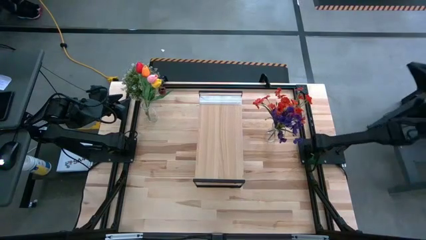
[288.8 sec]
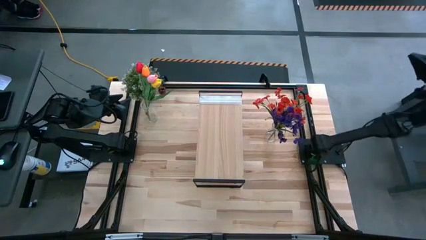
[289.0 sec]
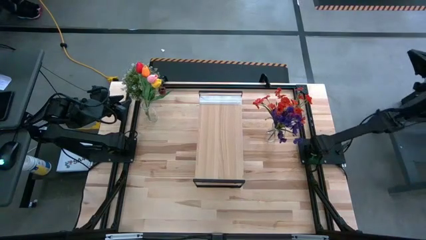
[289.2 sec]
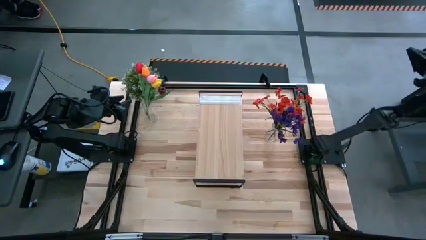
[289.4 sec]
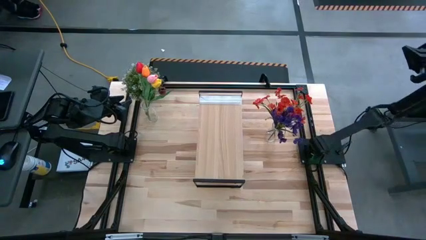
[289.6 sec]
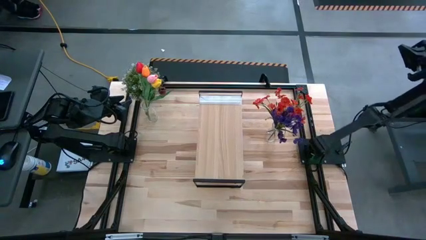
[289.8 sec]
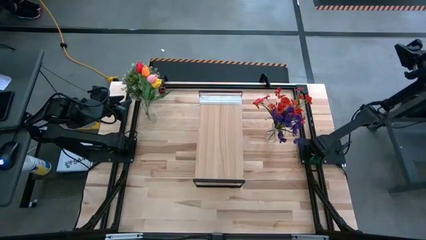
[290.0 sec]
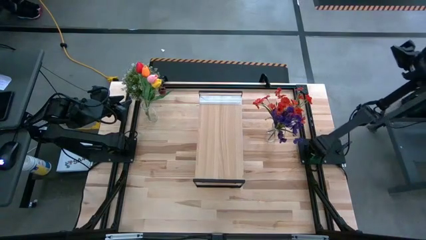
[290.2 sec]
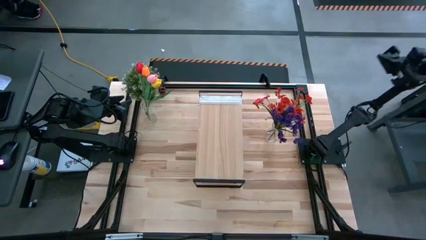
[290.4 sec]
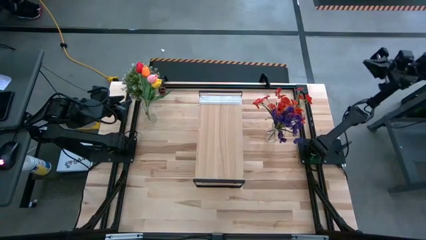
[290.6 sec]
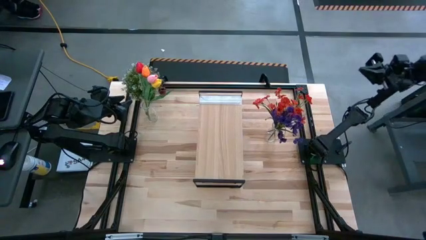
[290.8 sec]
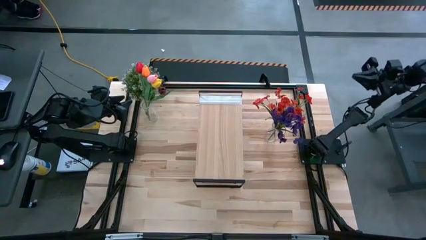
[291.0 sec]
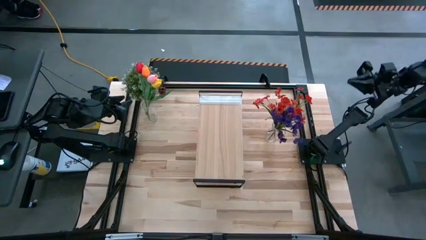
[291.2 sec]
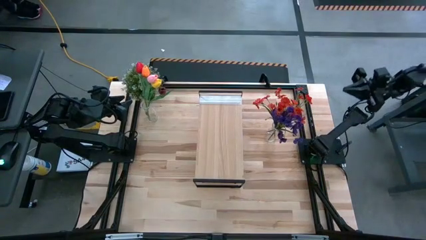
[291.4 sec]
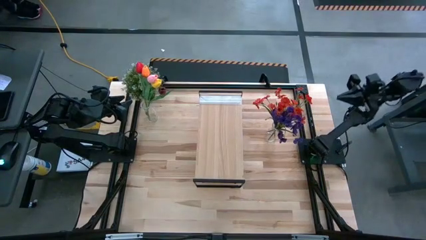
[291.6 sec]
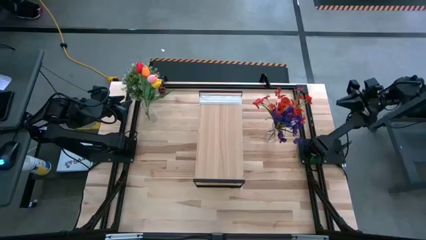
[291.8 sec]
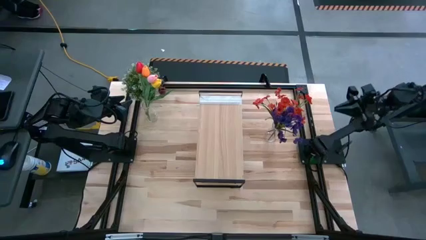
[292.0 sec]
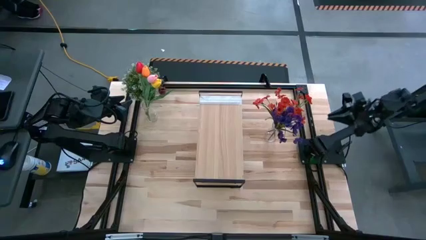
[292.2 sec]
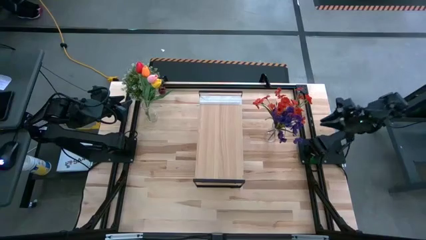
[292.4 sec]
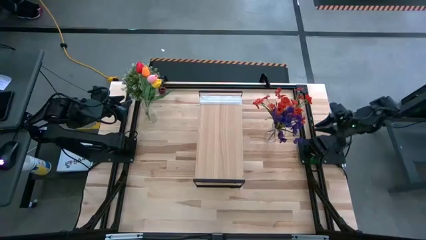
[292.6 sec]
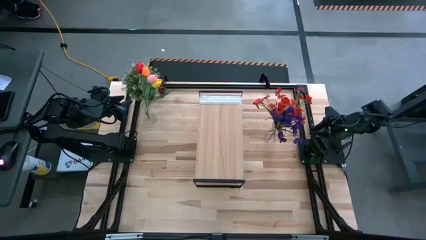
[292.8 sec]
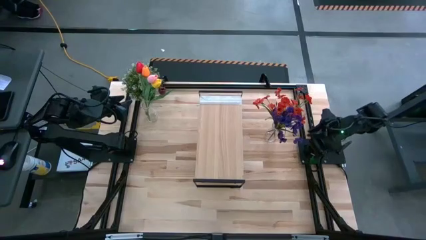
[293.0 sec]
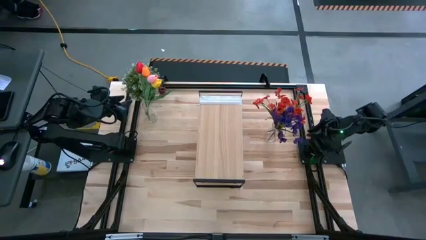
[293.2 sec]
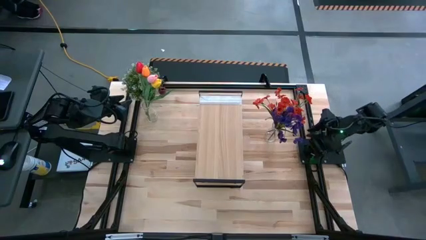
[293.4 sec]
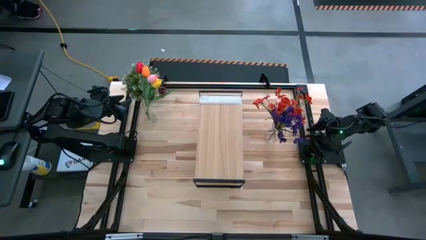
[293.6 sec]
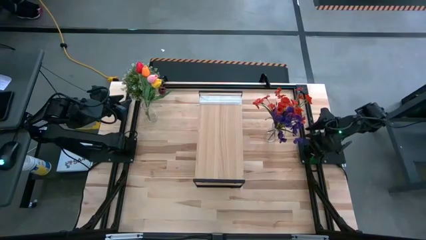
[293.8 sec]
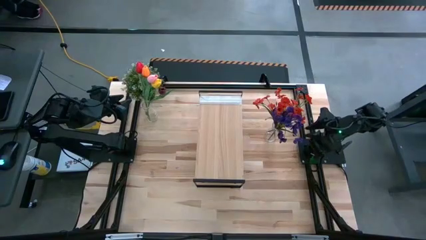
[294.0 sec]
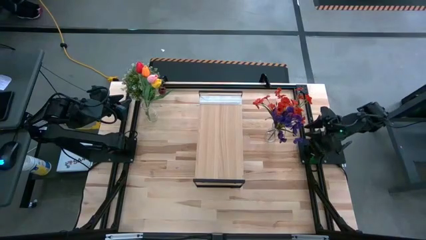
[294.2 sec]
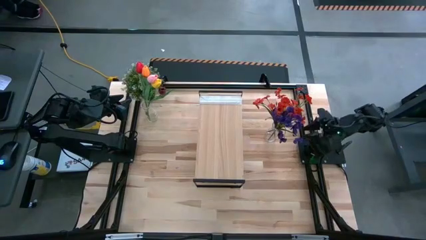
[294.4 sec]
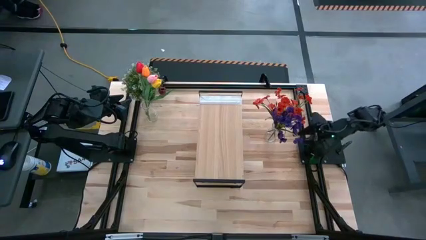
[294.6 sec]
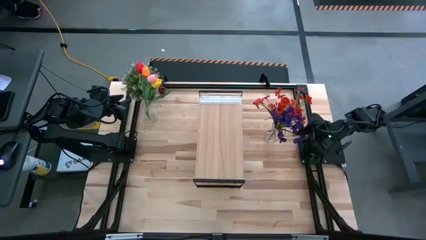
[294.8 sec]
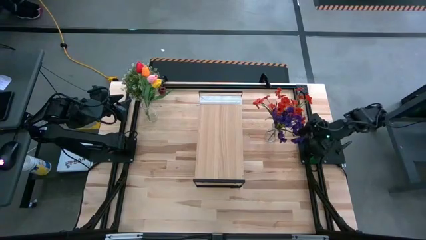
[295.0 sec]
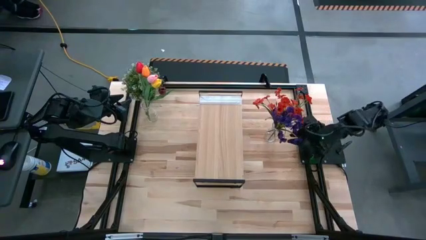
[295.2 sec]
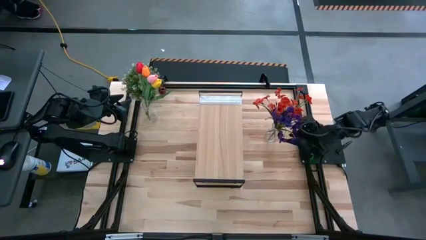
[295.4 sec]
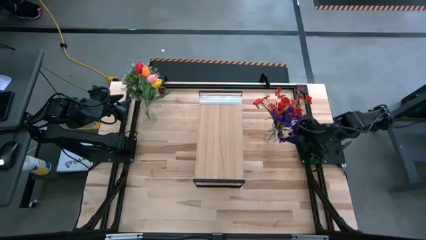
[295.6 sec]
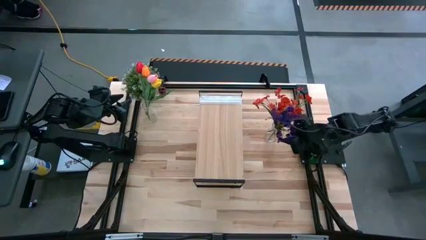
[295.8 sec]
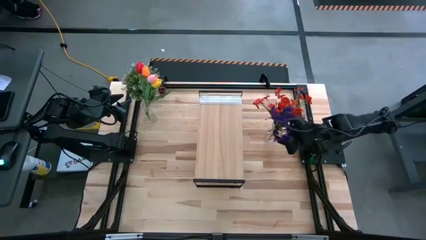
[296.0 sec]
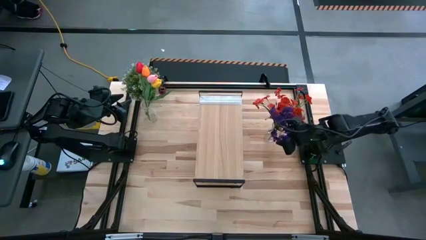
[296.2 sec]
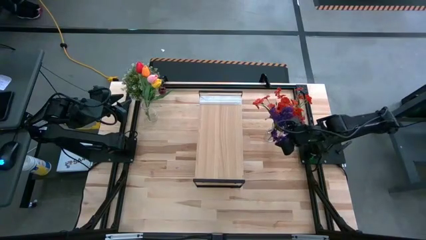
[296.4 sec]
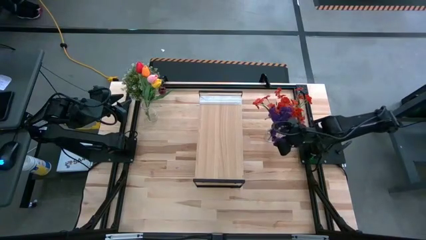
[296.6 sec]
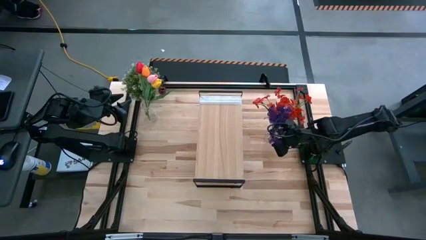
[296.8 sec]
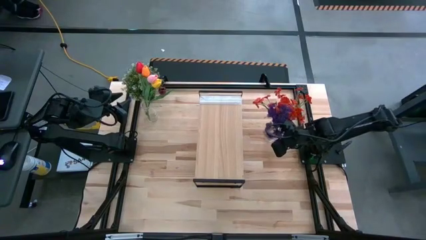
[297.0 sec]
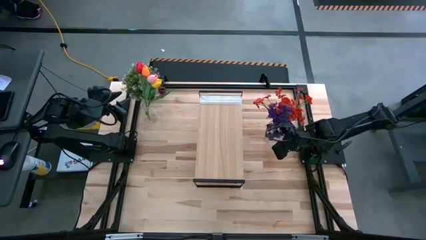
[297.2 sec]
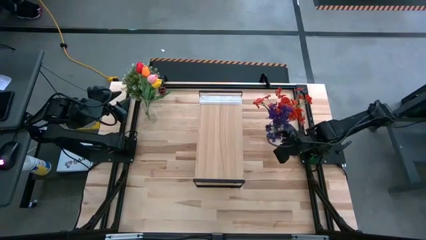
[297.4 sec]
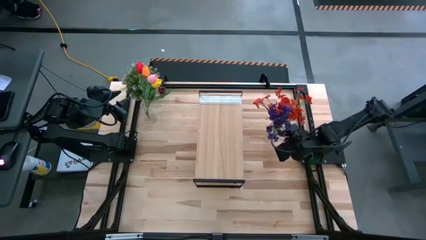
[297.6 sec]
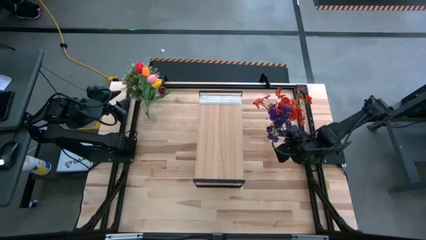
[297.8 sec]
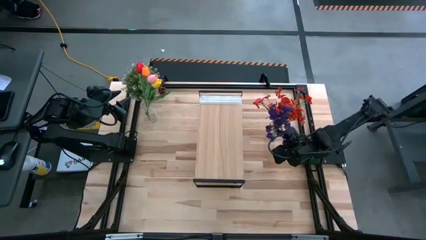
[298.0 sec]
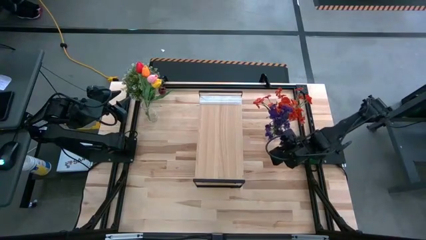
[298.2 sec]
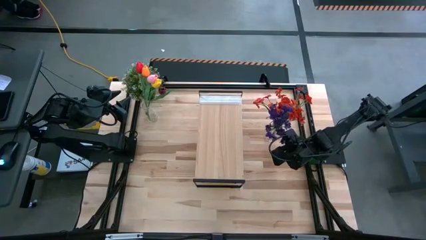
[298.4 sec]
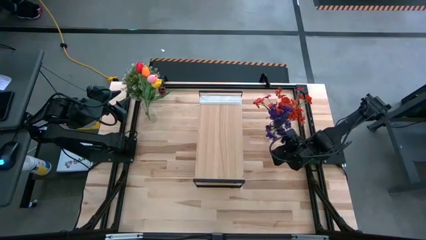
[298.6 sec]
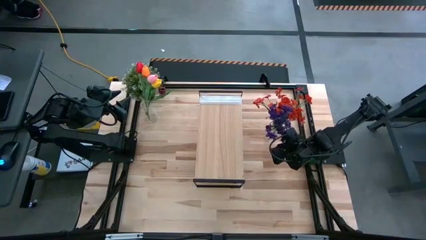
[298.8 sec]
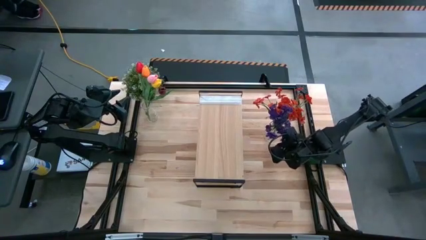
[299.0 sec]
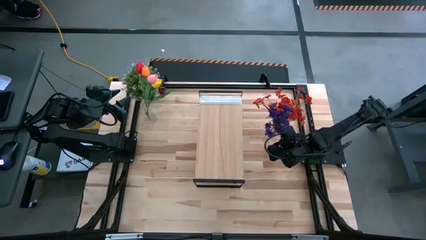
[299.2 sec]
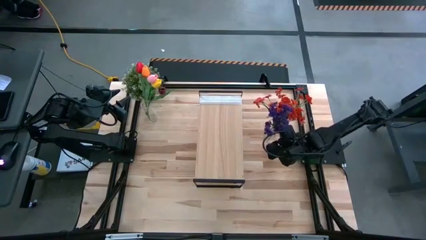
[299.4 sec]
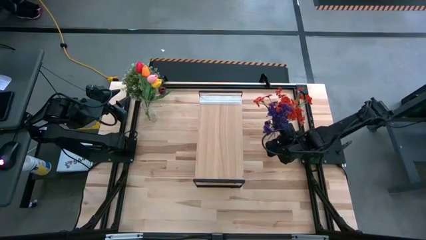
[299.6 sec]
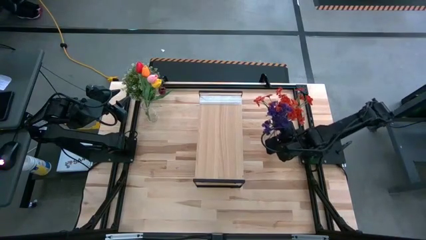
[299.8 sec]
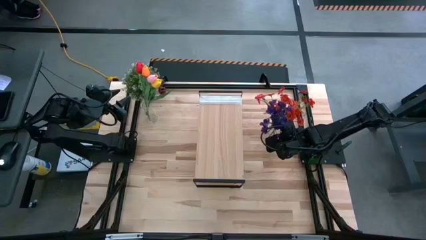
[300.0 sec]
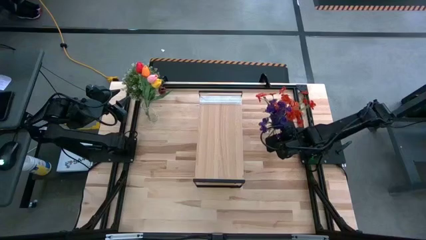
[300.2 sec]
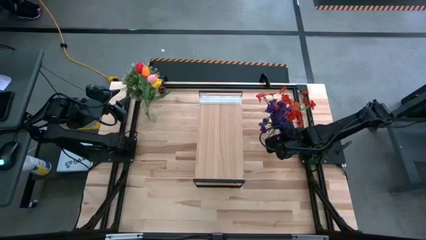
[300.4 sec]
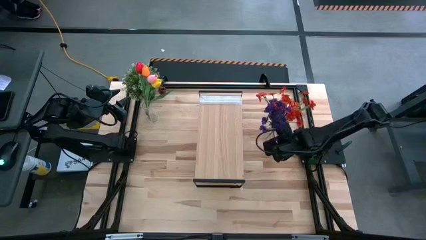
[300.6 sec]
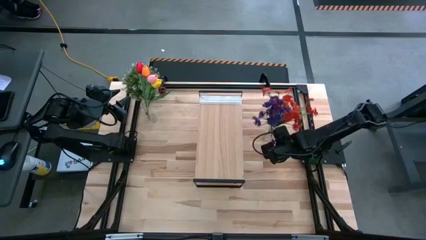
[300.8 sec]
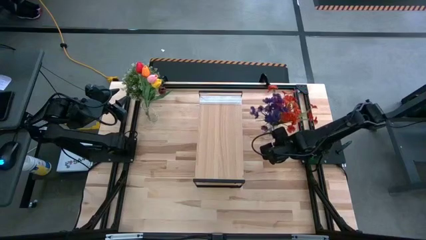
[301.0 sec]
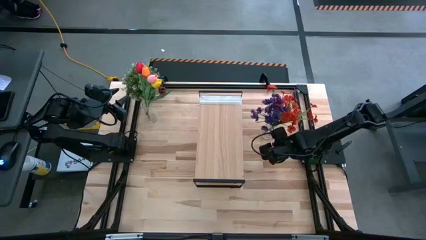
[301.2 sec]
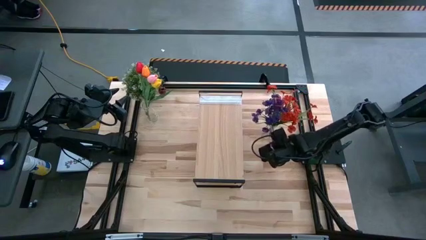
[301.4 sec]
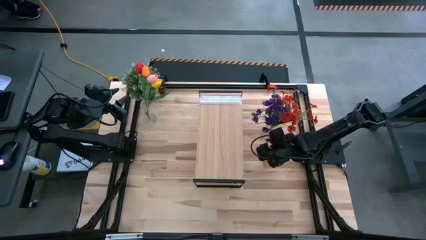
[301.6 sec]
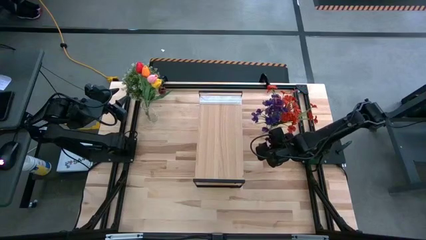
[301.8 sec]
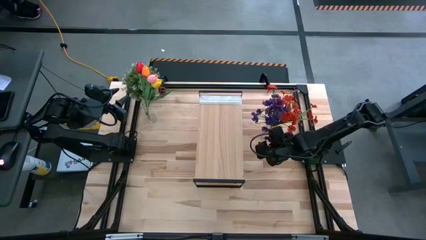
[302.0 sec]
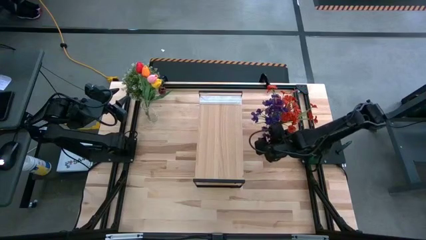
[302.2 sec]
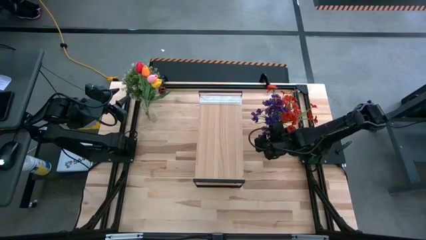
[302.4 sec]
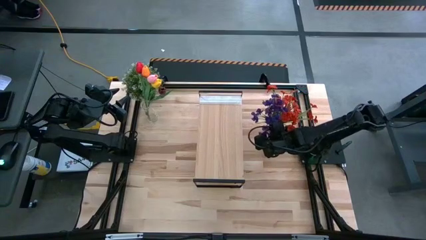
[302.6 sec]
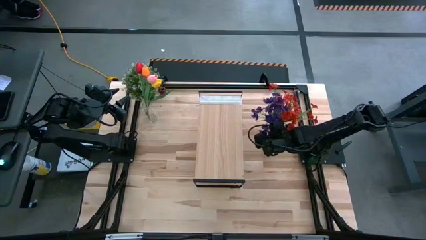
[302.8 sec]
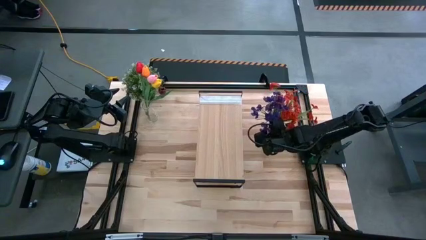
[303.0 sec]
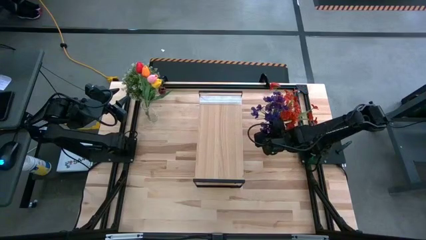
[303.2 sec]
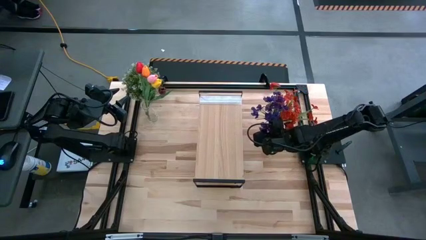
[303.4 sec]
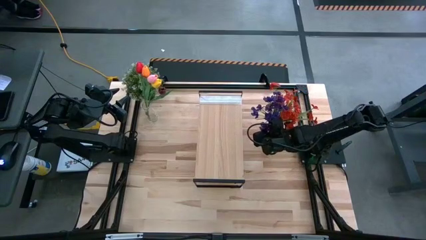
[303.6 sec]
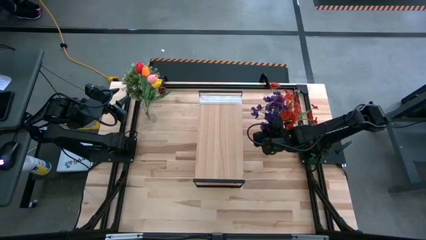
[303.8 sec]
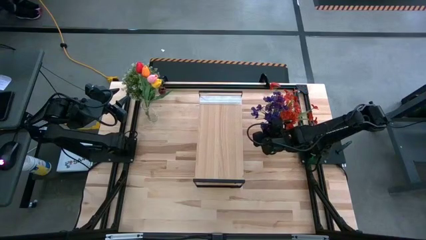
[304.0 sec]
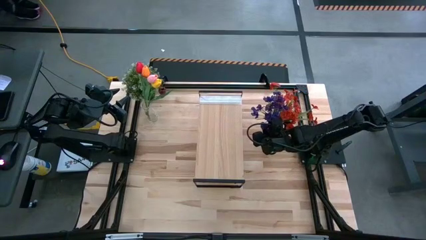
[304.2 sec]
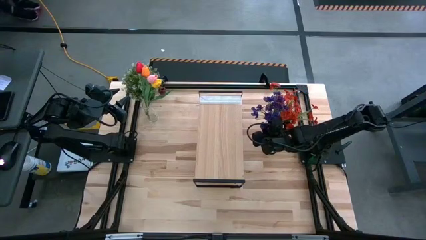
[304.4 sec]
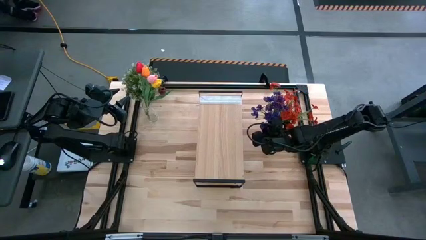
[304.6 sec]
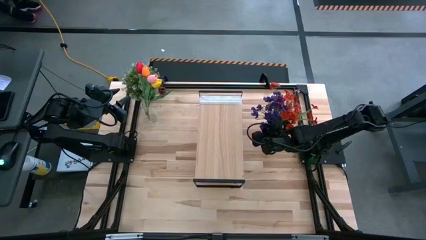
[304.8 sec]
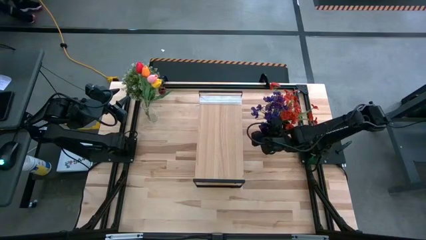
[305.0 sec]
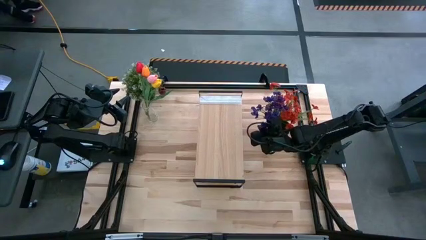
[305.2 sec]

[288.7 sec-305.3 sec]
Task: Pick and place flowers into a vace then onto a shelf
Put the right transparent flower vase on the shelf
